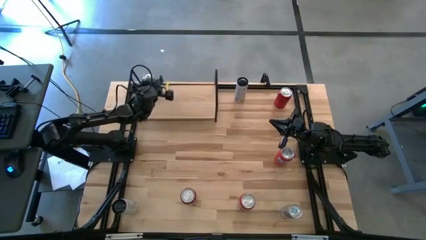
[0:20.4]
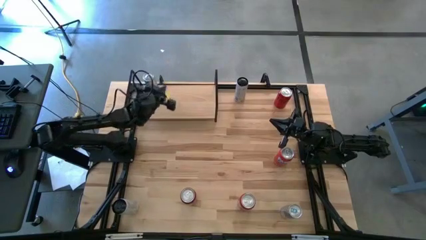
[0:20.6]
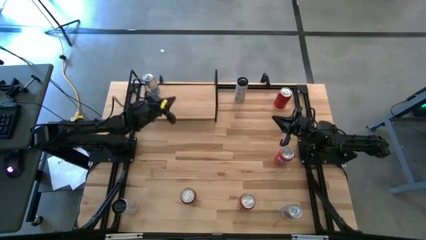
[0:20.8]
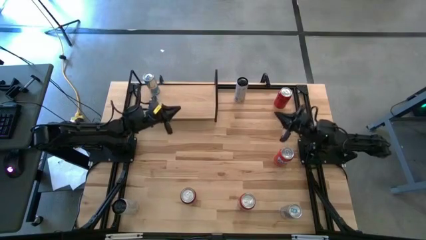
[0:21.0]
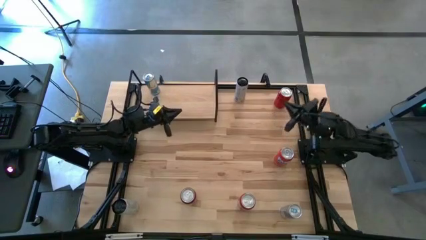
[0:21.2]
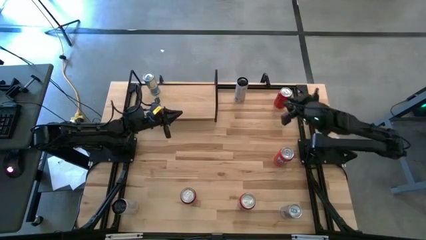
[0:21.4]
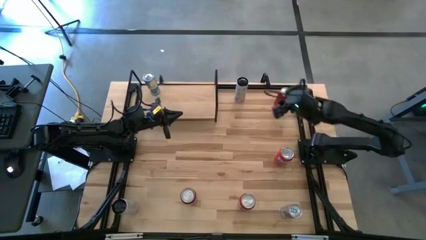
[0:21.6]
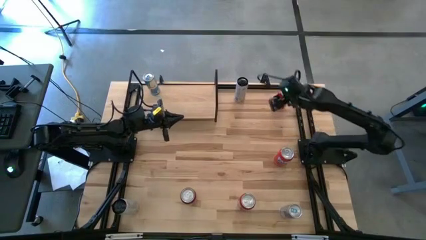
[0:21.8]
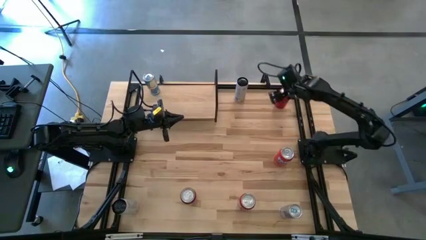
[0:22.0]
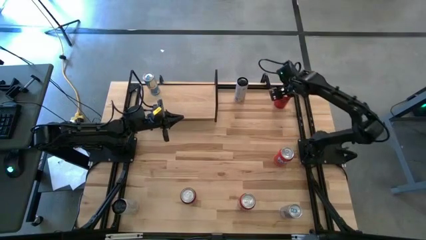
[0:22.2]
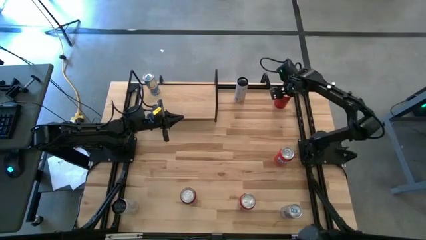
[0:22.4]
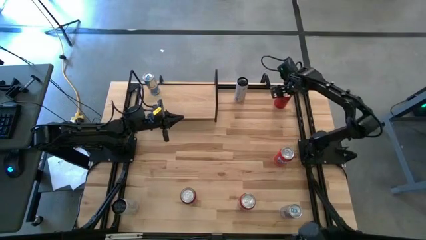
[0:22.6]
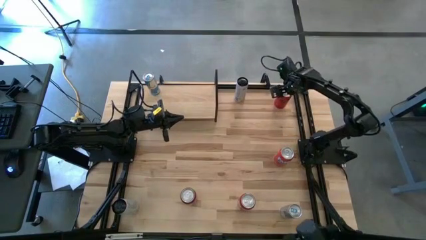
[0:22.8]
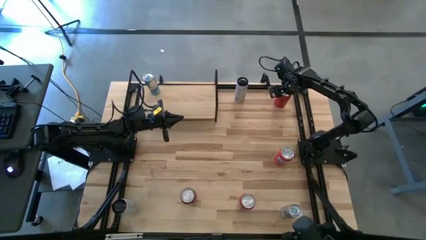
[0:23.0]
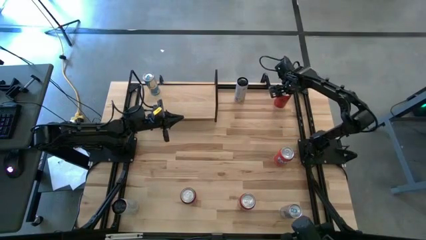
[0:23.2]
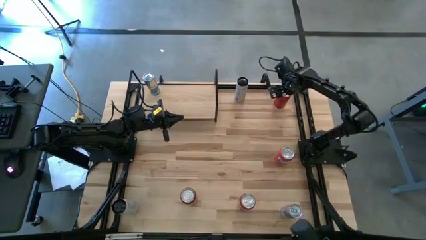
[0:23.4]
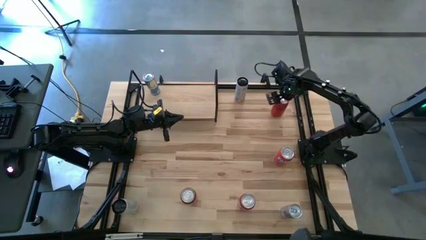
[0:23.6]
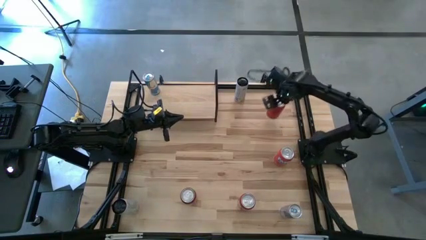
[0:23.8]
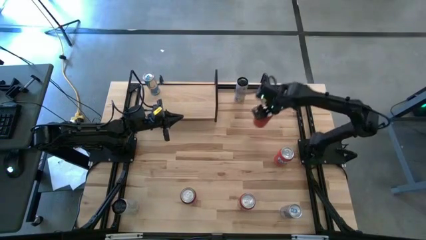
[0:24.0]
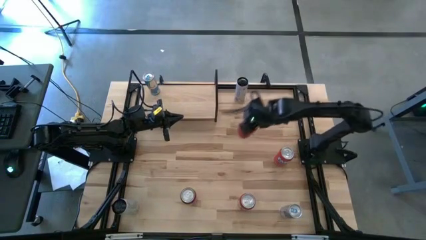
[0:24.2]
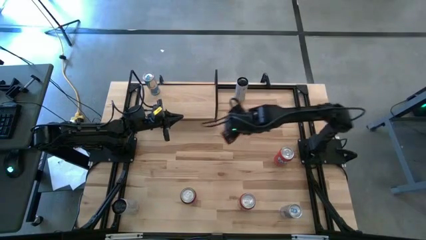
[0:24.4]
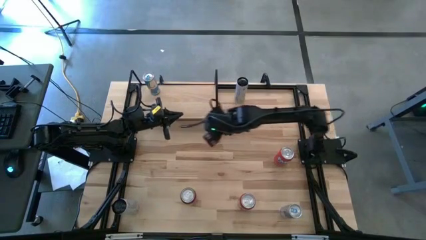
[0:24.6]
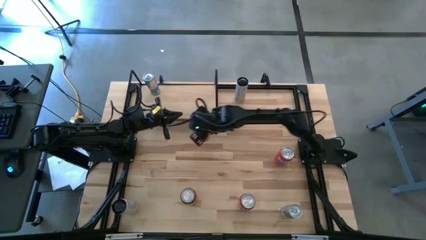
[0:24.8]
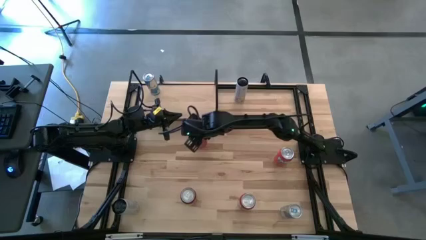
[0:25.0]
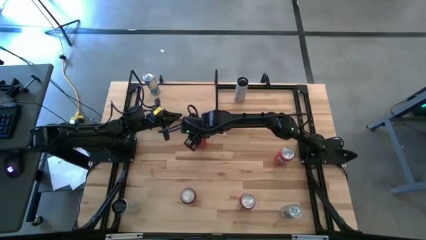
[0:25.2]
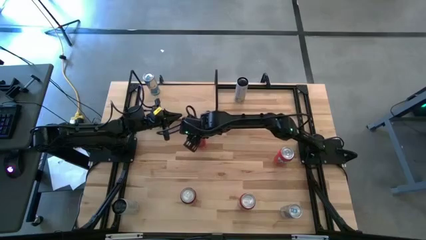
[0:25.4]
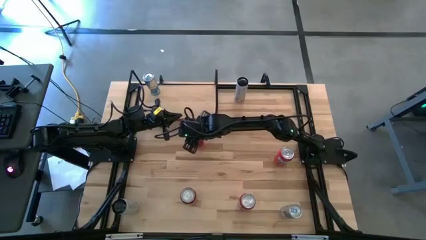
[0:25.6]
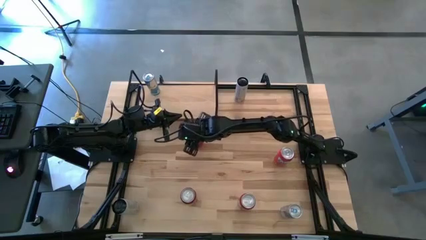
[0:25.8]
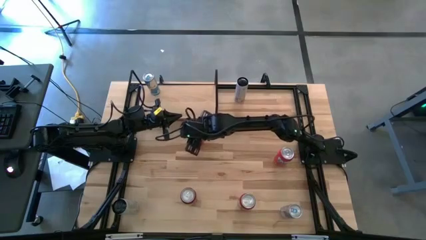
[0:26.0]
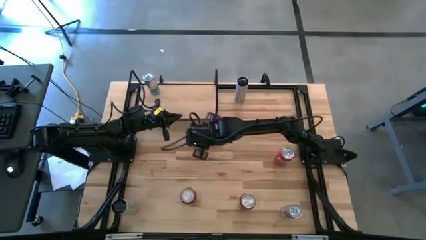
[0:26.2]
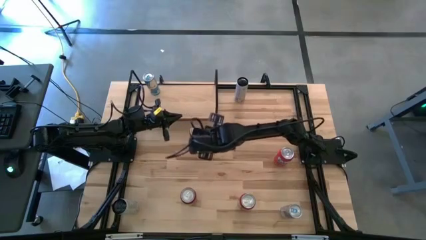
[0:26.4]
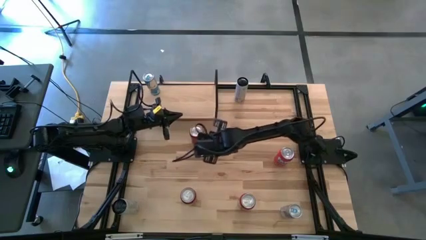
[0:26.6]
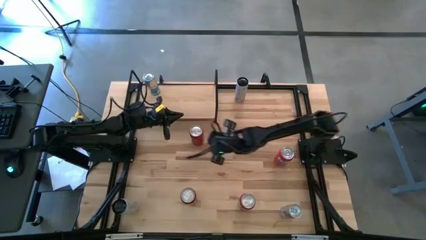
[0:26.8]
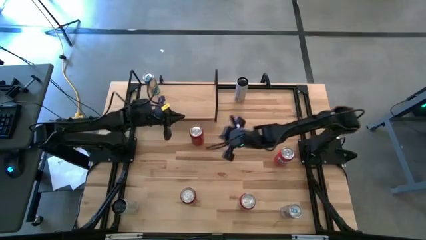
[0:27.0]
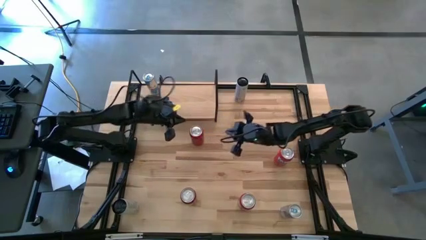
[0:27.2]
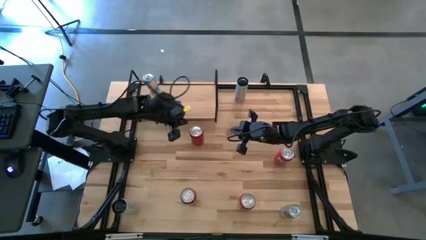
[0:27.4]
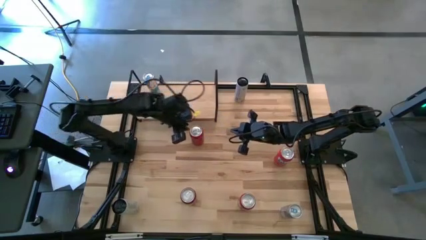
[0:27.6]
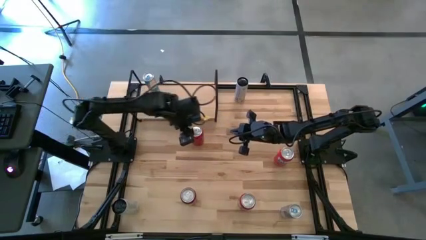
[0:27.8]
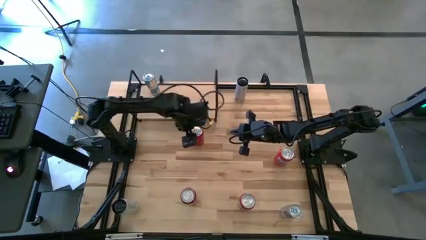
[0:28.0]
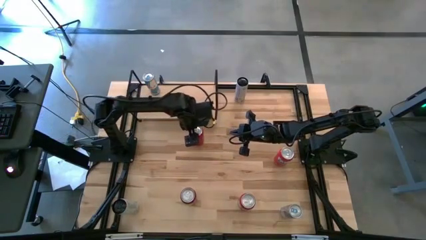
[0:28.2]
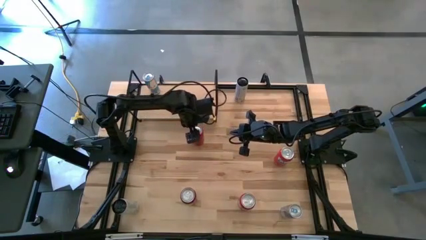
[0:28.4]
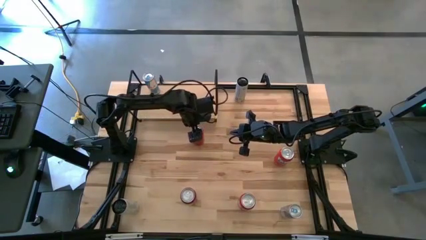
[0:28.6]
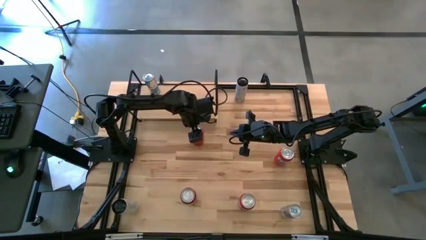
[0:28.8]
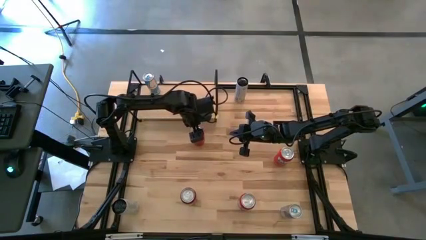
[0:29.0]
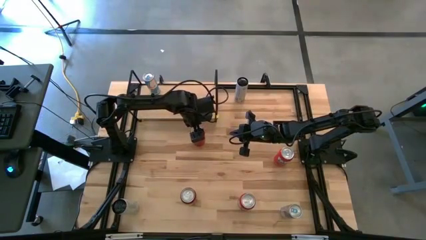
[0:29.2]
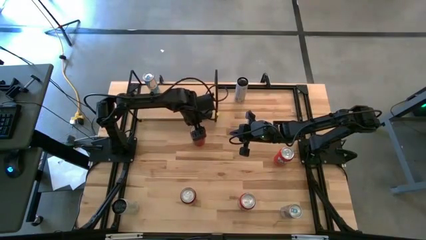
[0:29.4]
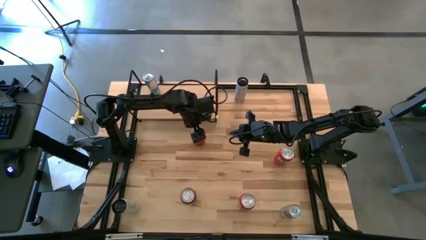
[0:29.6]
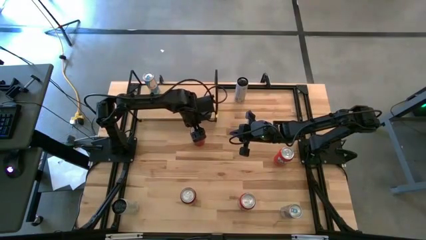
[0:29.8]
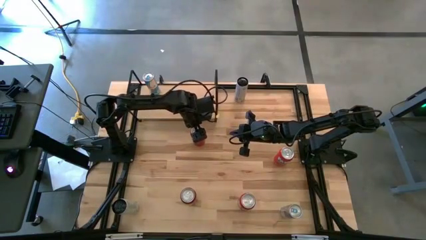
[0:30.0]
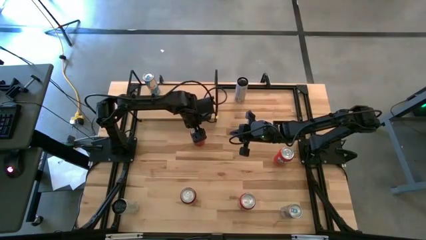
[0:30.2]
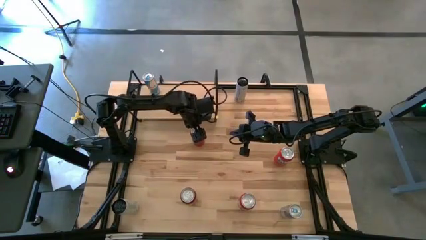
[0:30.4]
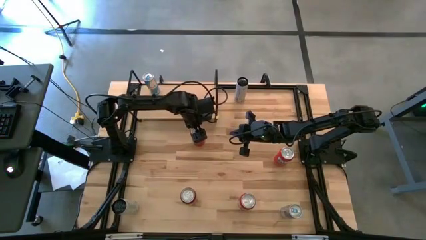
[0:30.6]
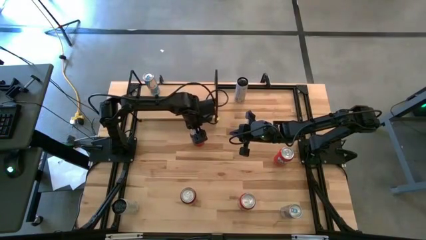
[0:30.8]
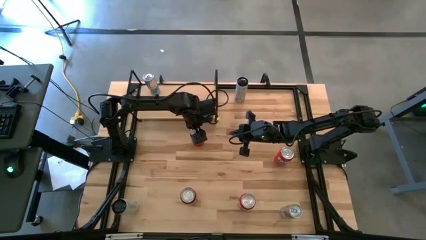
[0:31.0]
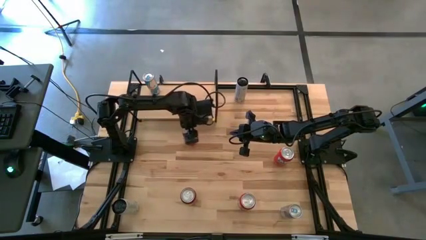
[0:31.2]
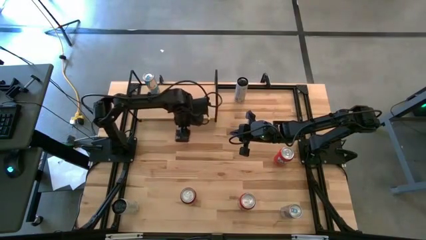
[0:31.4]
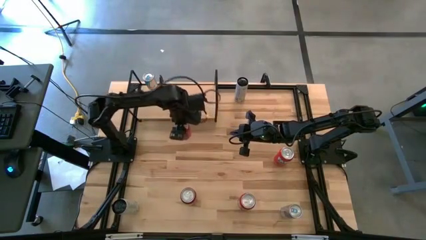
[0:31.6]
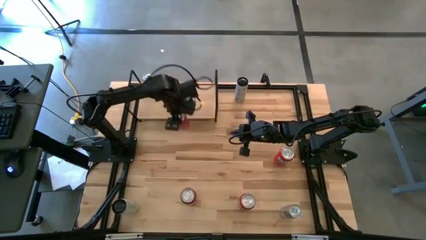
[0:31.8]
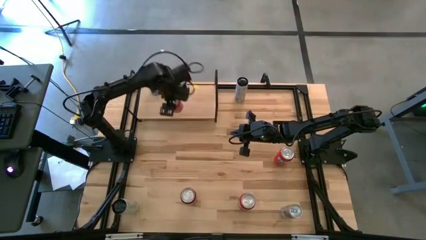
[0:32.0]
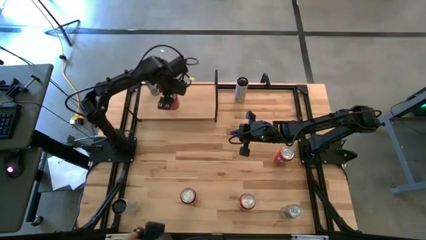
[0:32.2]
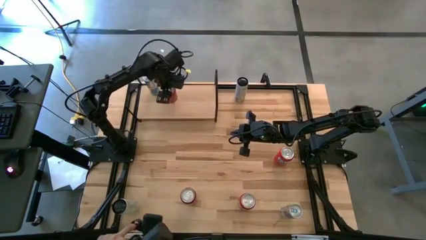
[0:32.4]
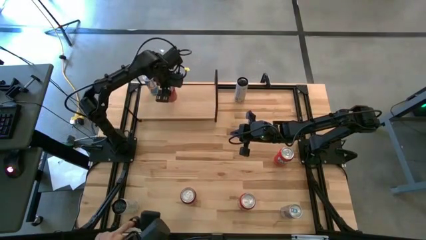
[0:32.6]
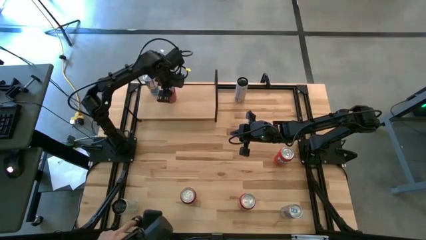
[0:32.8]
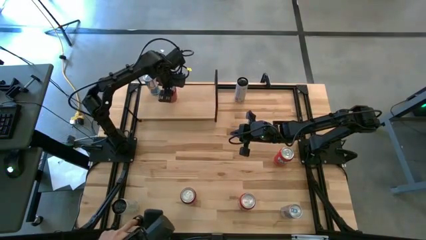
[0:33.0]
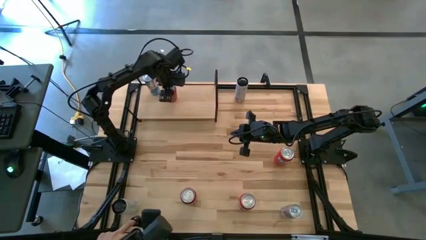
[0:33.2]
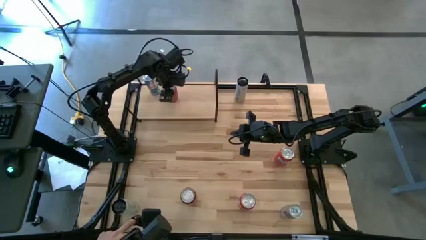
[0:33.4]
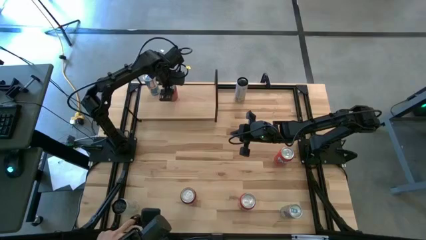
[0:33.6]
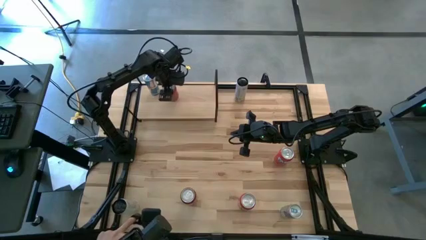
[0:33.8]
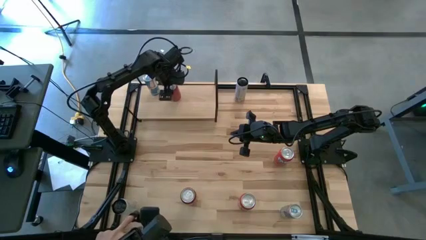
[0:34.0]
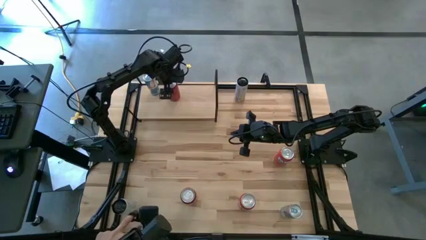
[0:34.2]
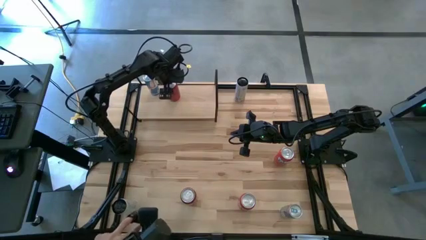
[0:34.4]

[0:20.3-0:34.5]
Task: Place canned beverage on shelf
Put the top red black soda can on the shelf
